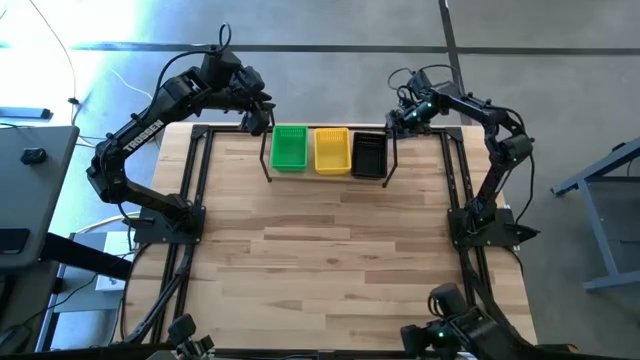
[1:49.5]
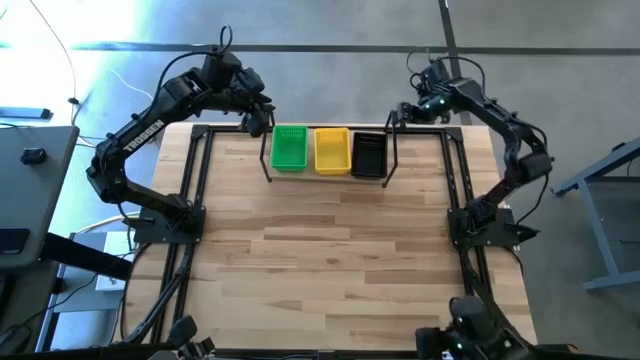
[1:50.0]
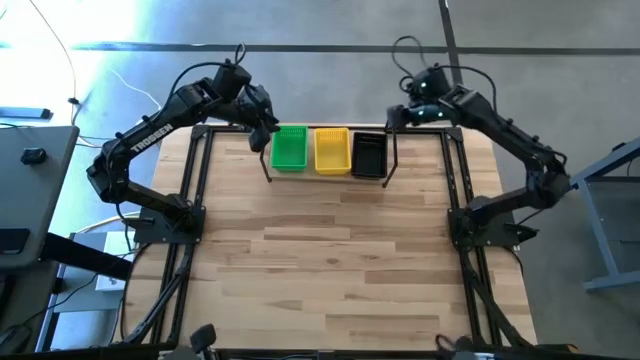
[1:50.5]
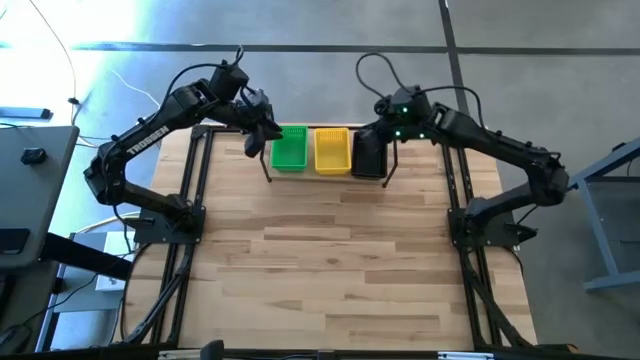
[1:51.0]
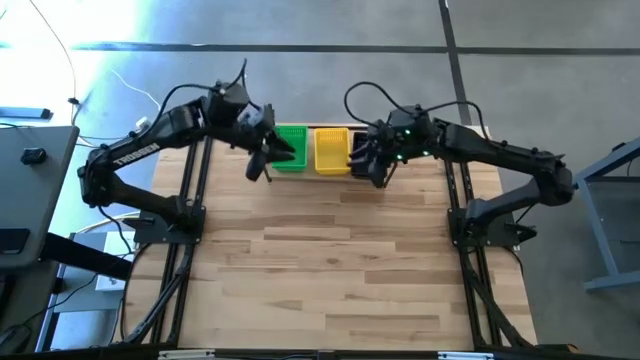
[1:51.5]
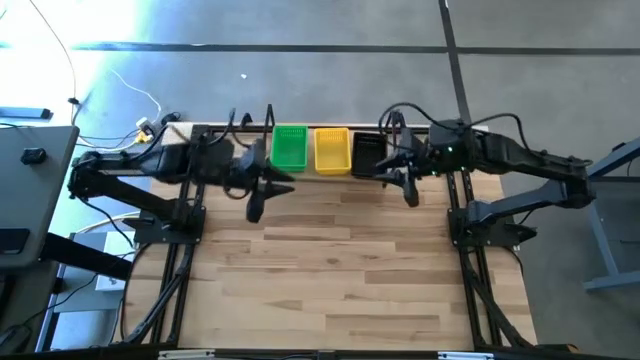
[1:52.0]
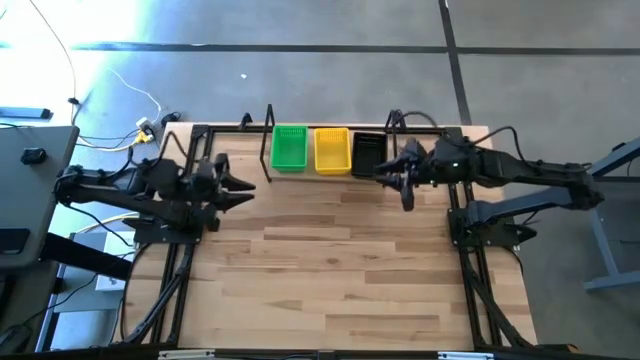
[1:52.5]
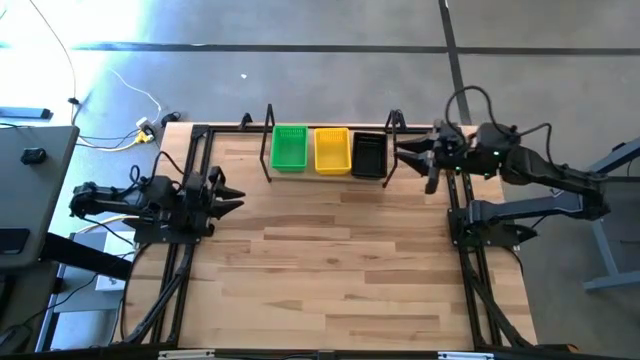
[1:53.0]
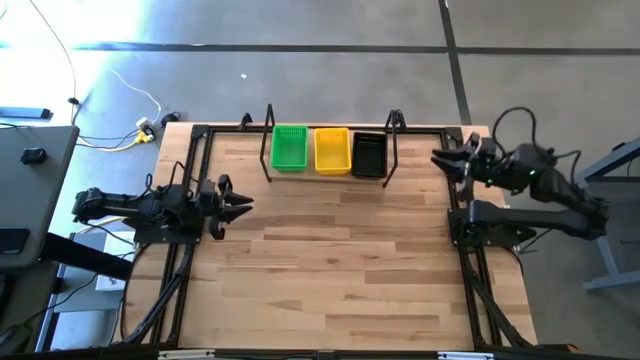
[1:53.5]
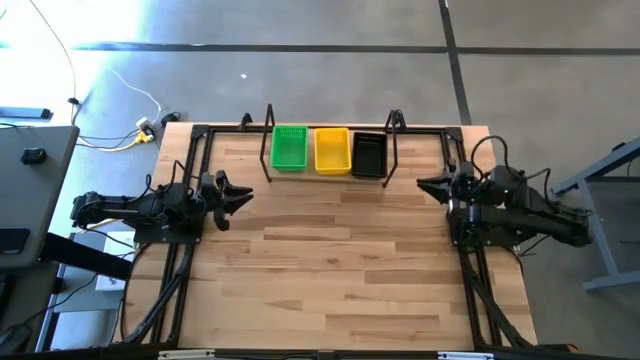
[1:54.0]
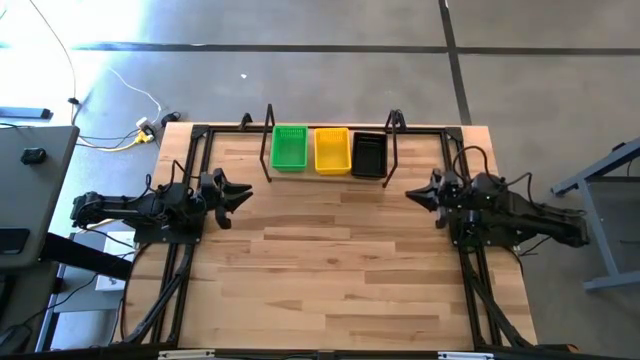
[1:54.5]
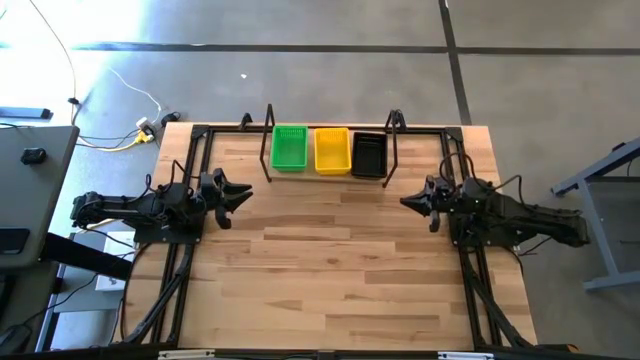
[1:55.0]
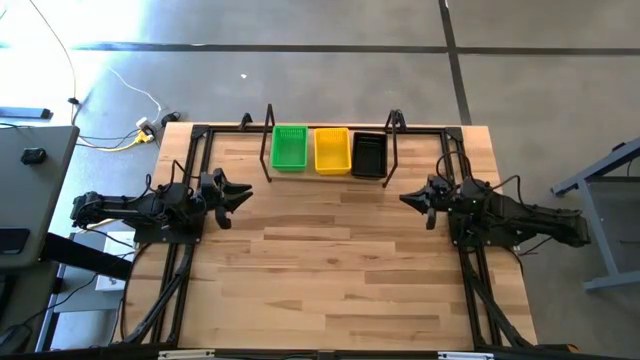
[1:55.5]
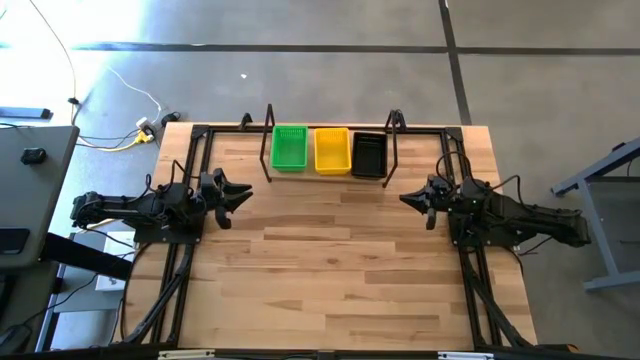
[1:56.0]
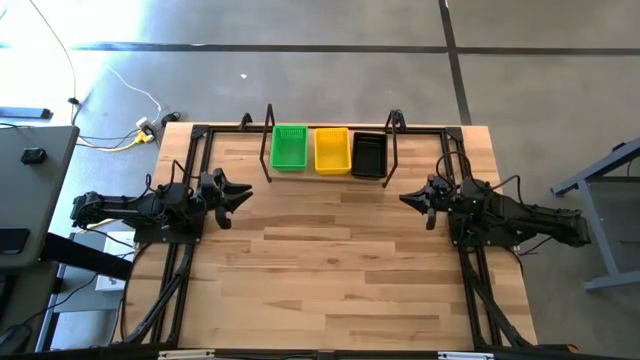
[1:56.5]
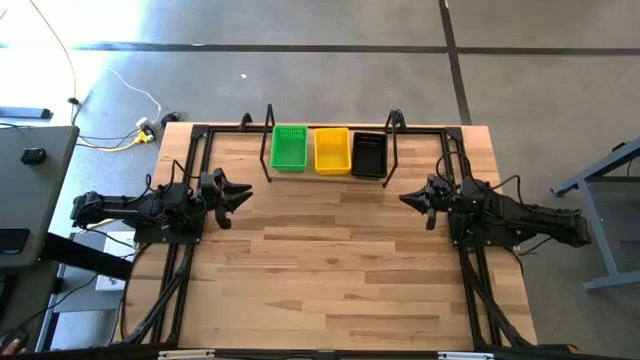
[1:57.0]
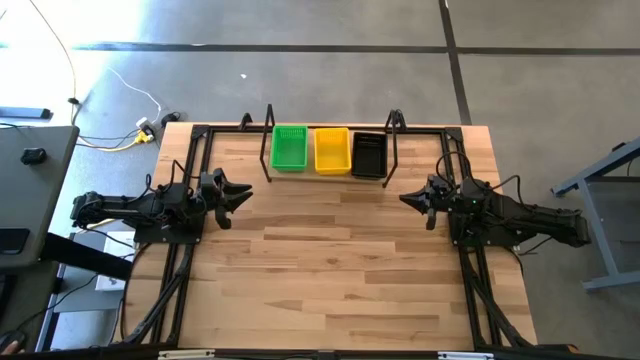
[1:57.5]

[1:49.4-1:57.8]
Task: Stack baskets on shelf by color
Return to Home Position

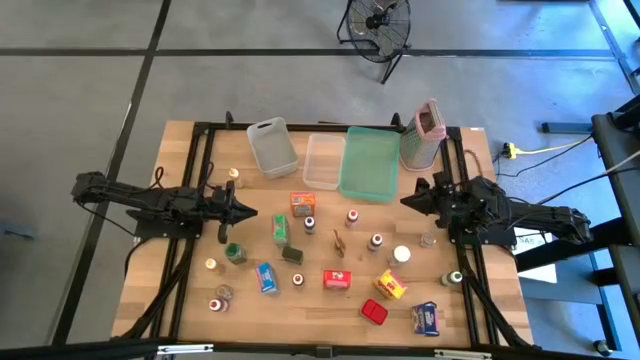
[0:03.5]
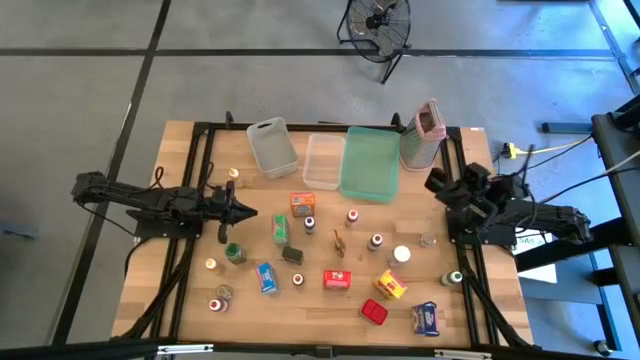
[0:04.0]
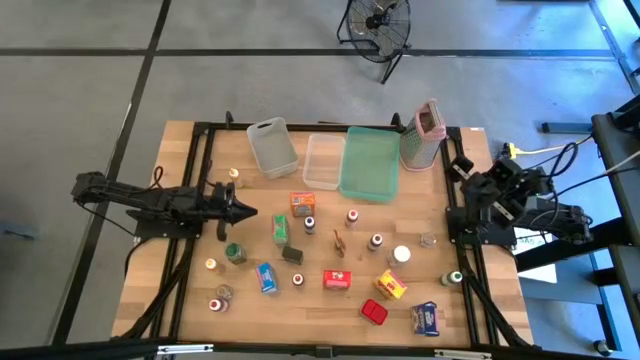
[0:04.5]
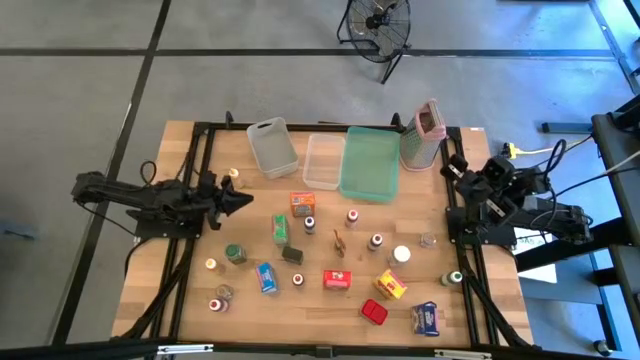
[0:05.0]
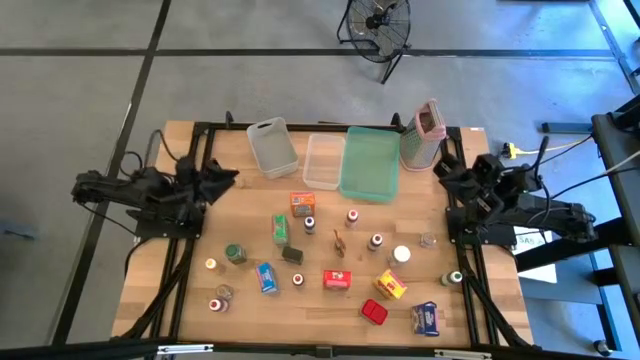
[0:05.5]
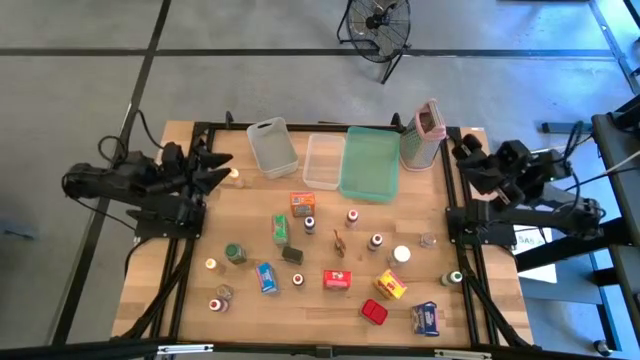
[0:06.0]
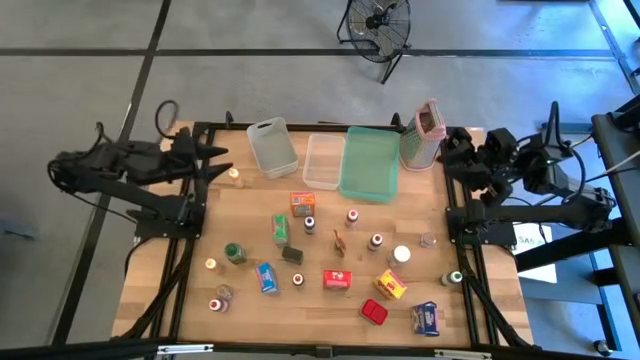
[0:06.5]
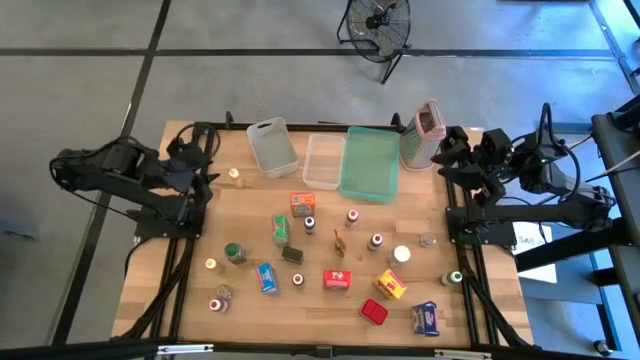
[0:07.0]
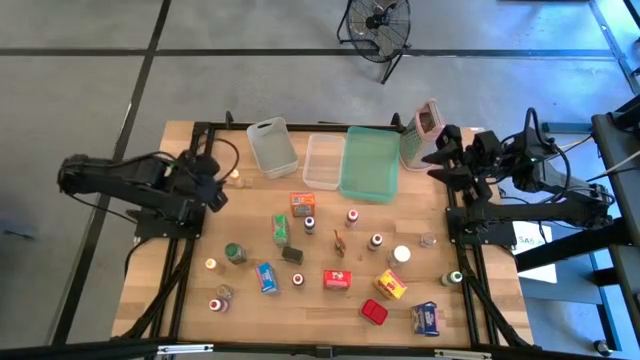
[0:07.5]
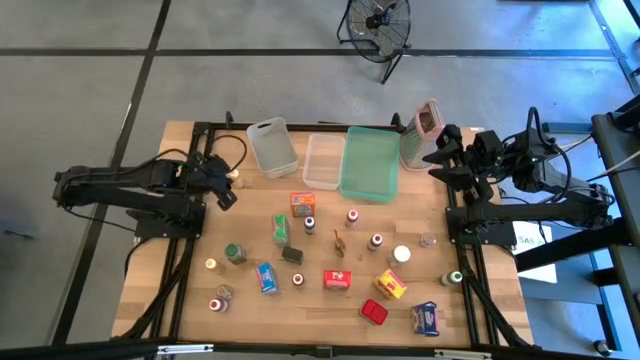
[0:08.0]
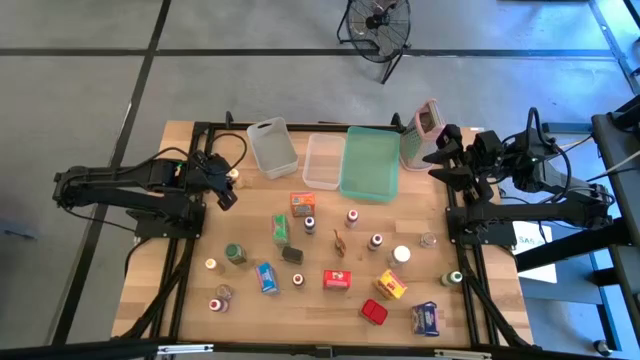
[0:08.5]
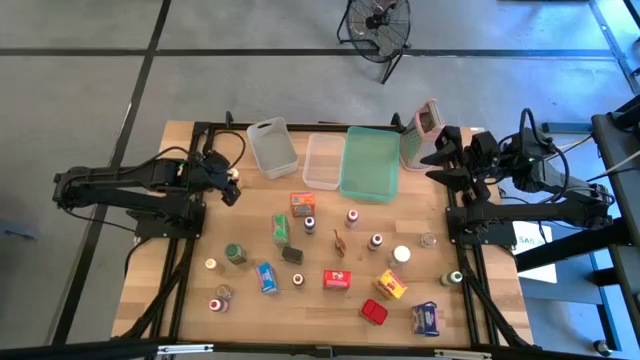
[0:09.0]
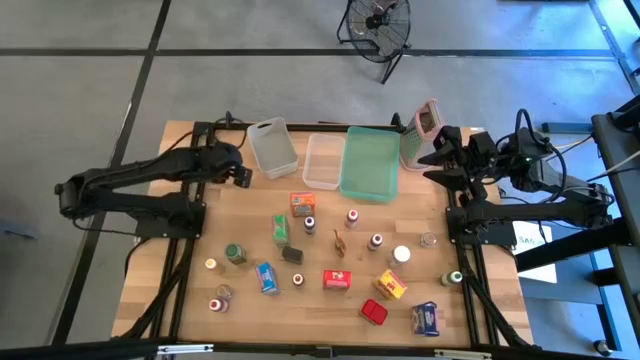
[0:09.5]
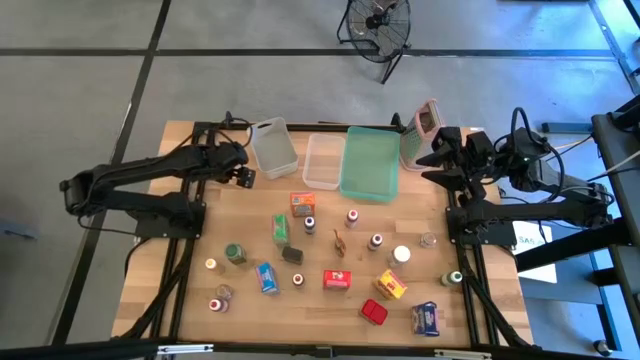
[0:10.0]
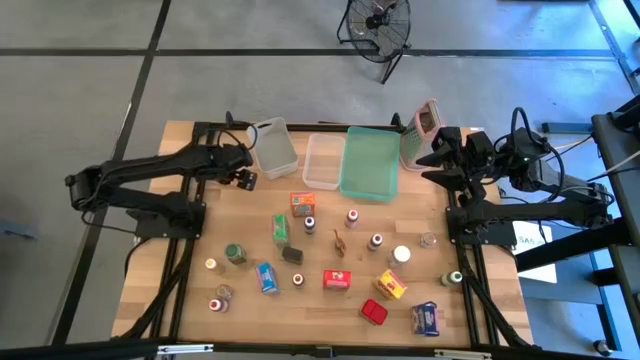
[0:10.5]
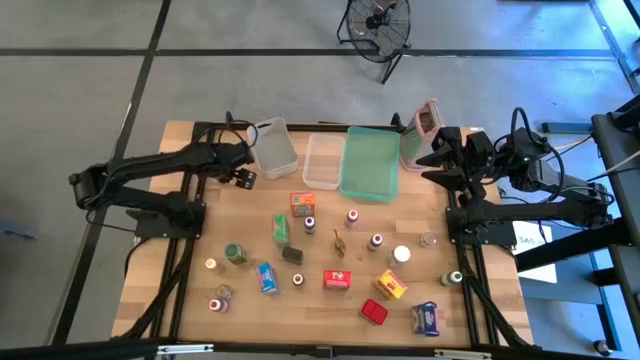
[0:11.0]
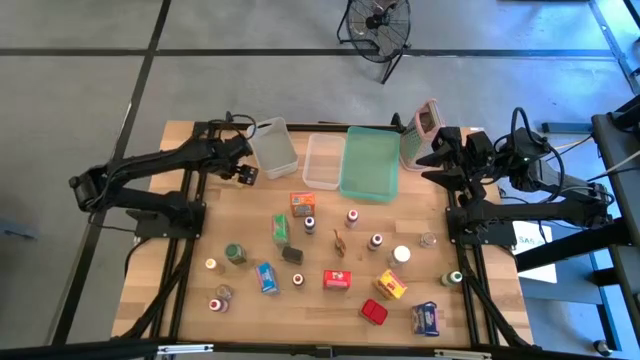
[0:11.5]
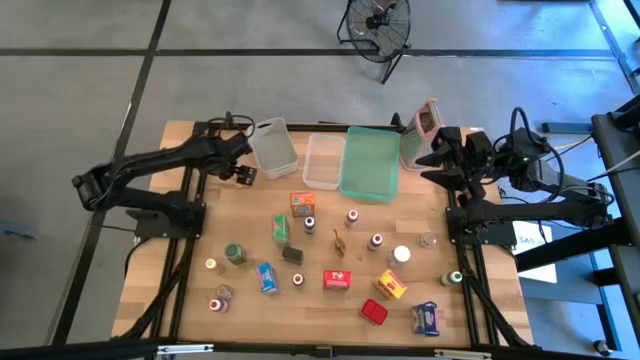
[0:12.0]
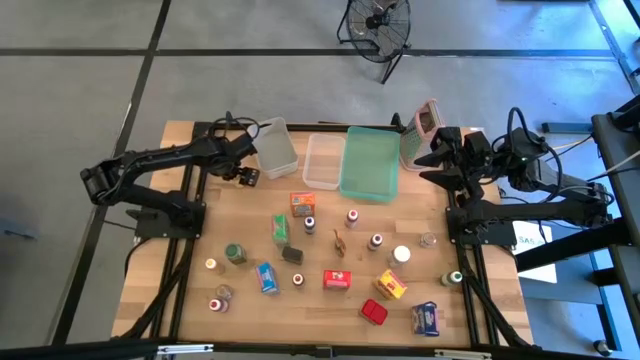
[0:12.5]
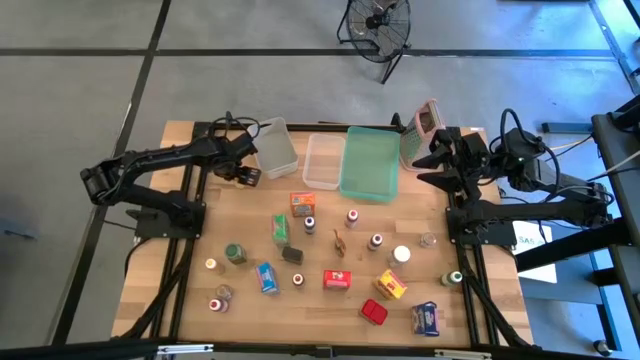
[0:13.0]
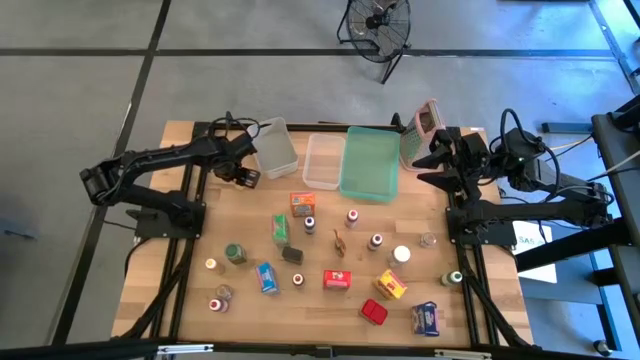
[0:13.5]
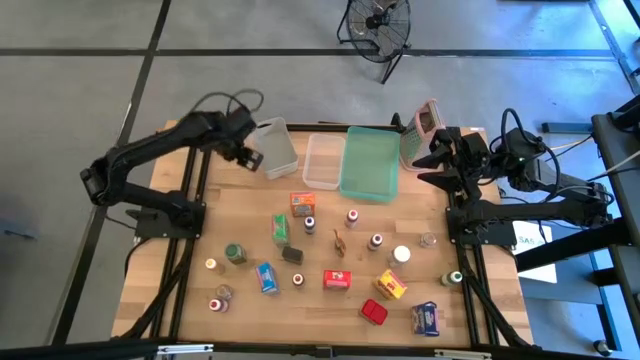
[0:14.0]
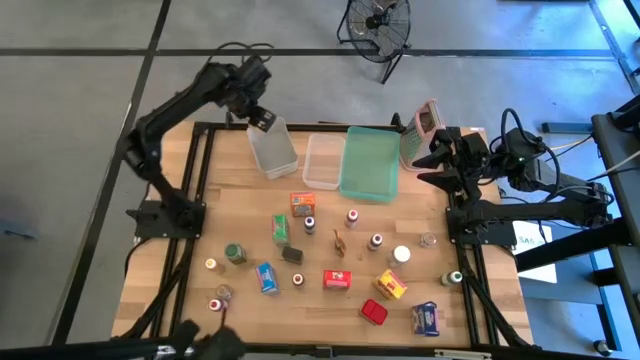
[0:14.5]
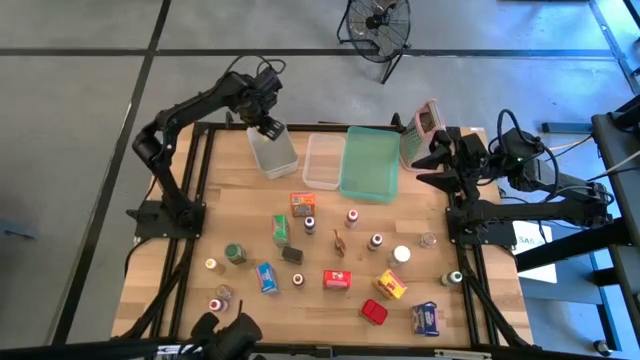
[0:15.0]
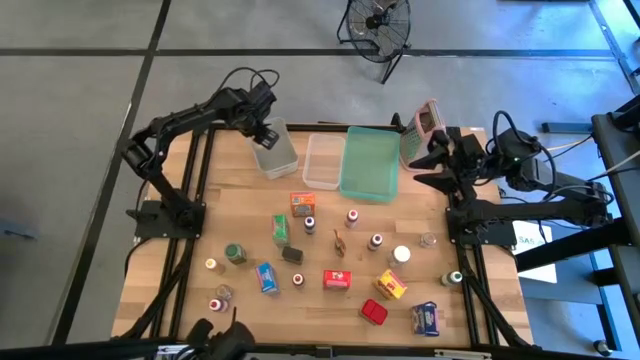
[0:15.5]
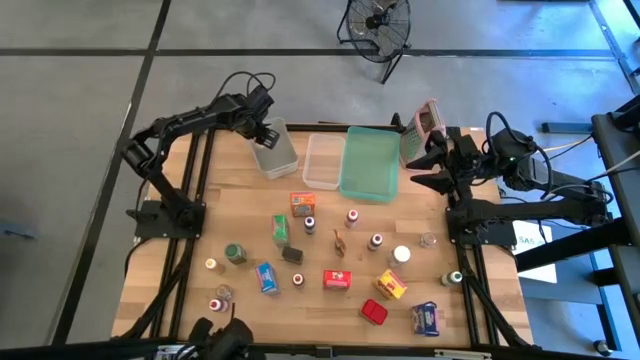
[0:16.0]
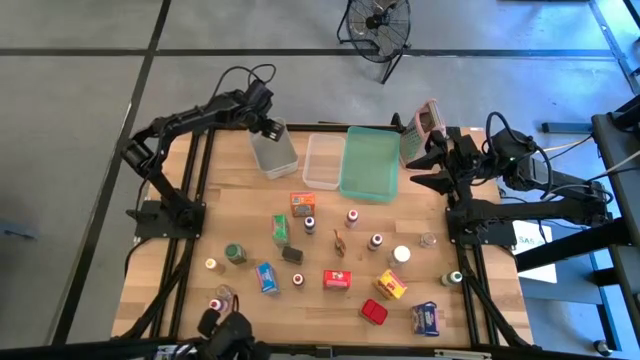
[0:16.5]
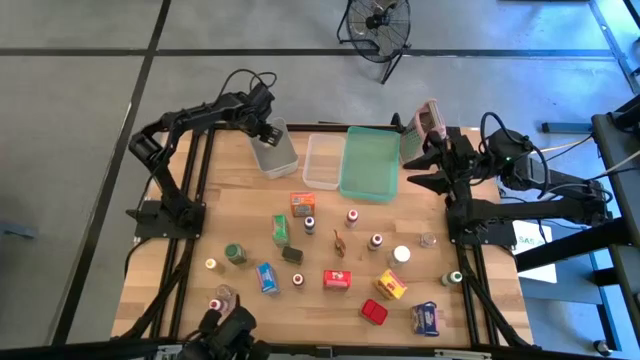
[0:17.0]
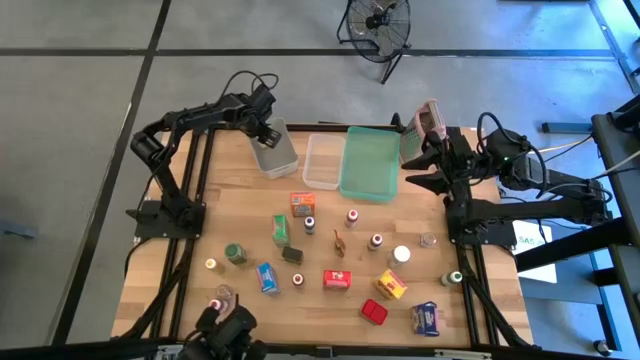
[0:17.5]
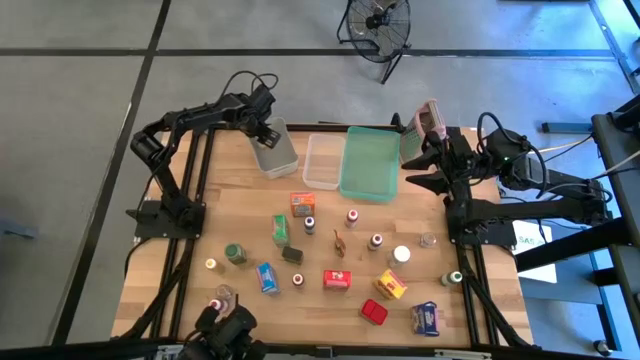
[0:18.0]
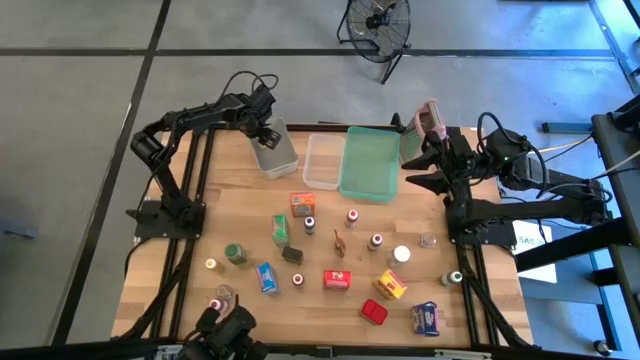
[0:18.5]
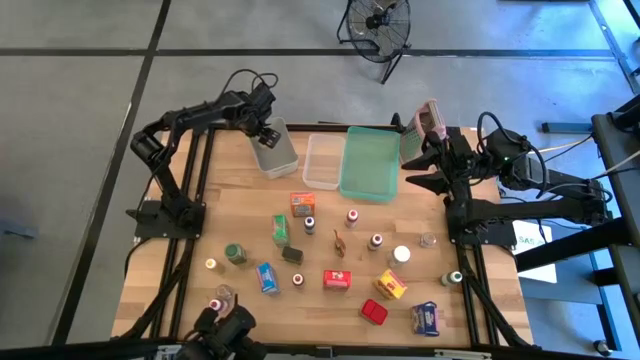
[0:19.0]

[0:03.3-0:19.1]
Task: Pick & Place Kitchen Items
Put the yellow food coloring bottle into the gray bin
